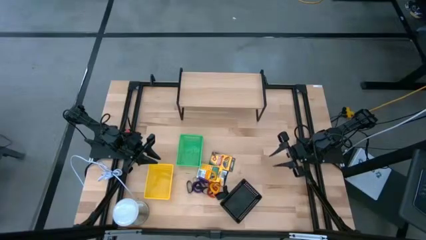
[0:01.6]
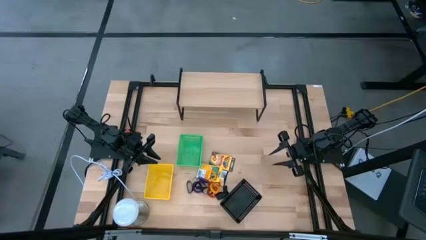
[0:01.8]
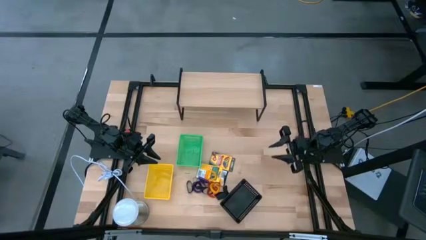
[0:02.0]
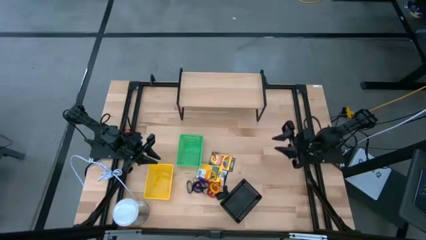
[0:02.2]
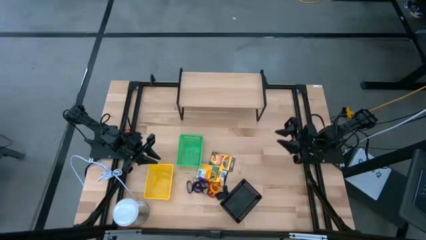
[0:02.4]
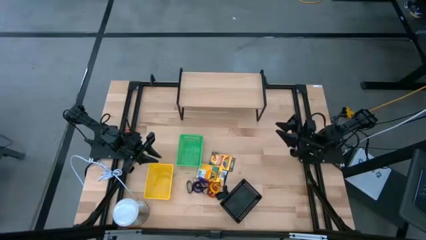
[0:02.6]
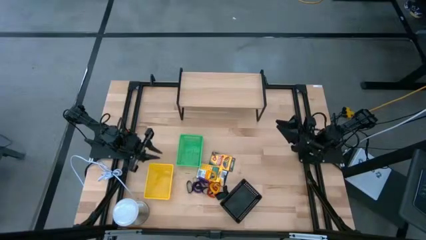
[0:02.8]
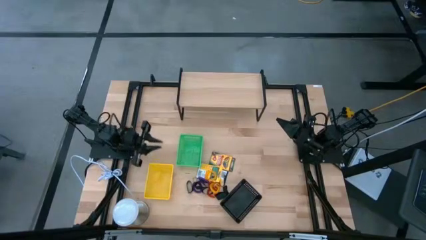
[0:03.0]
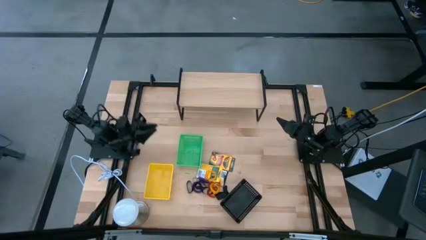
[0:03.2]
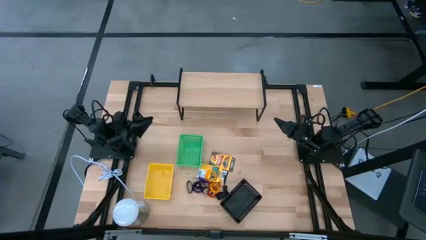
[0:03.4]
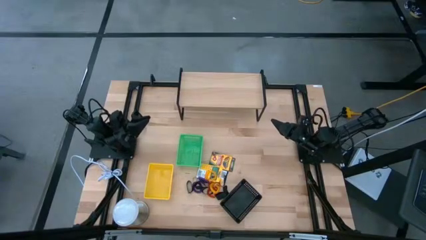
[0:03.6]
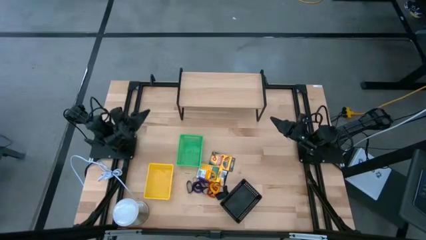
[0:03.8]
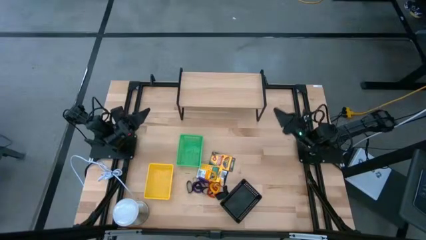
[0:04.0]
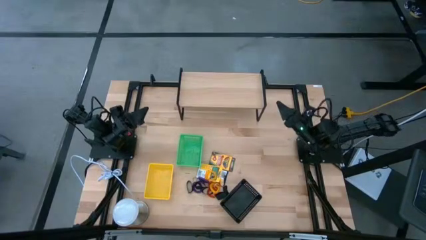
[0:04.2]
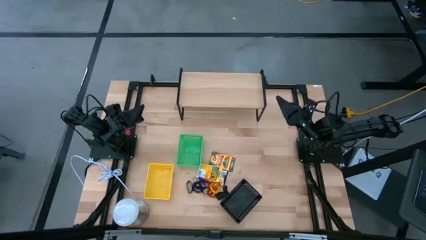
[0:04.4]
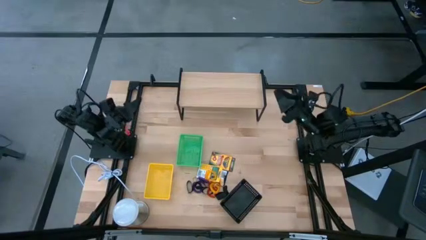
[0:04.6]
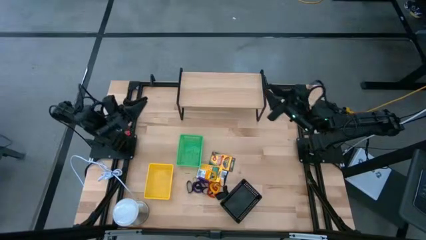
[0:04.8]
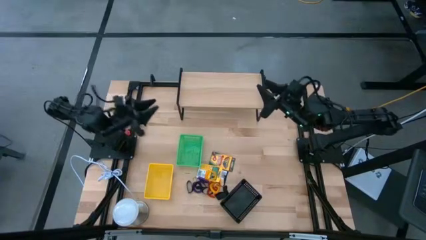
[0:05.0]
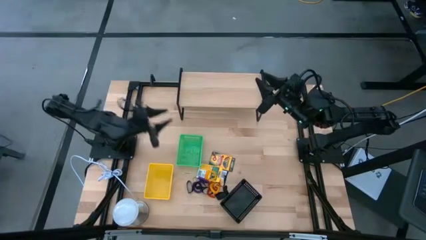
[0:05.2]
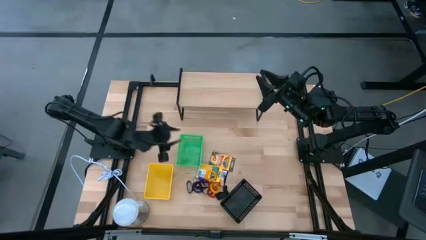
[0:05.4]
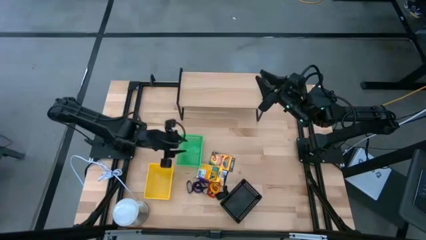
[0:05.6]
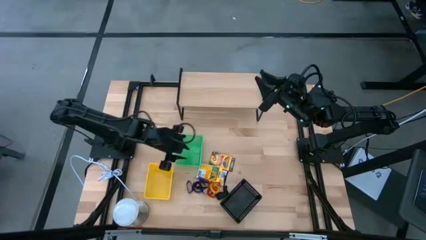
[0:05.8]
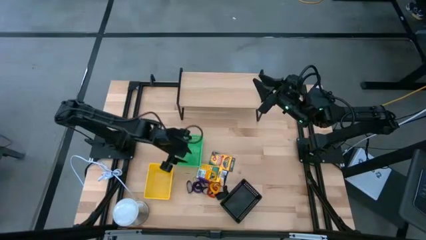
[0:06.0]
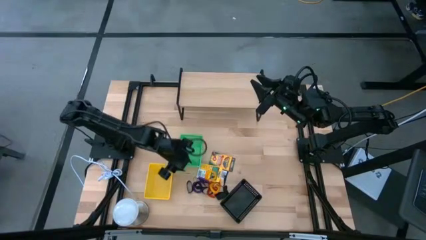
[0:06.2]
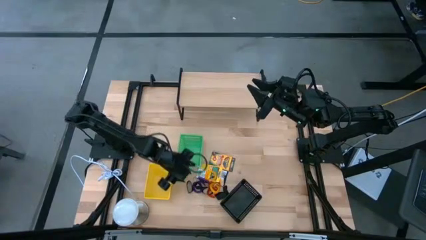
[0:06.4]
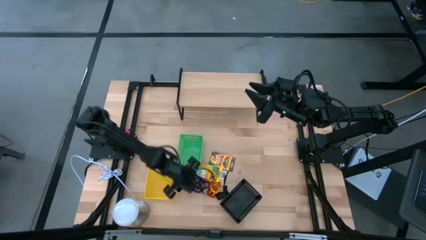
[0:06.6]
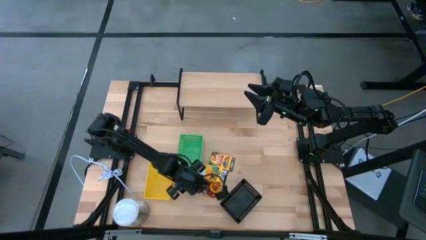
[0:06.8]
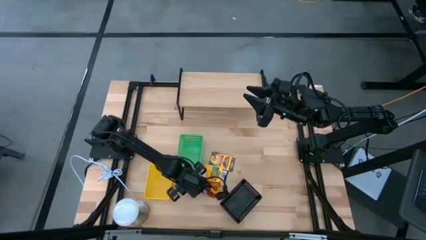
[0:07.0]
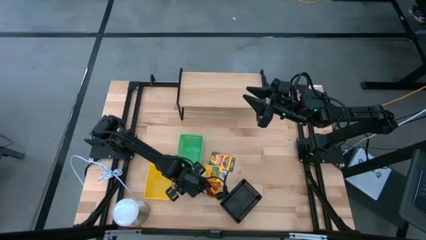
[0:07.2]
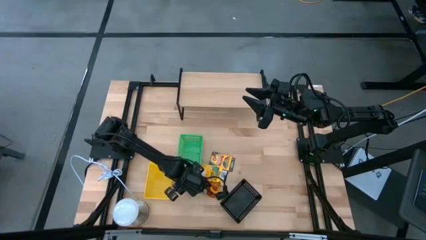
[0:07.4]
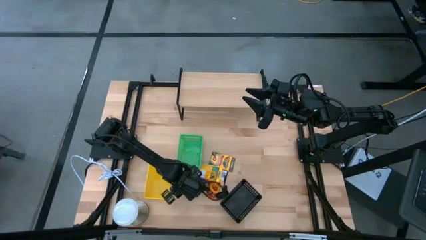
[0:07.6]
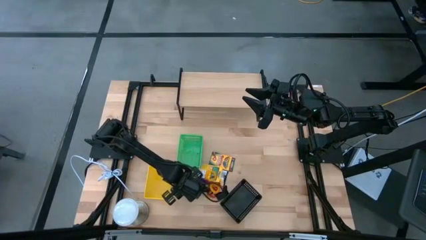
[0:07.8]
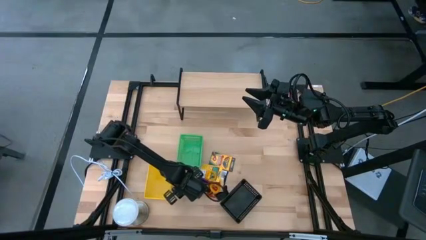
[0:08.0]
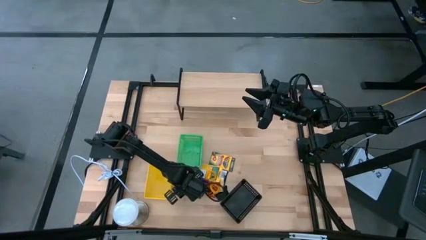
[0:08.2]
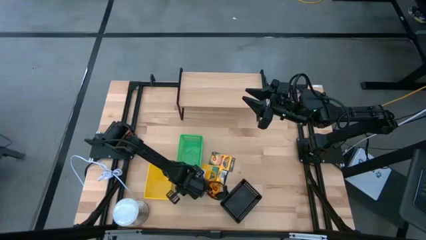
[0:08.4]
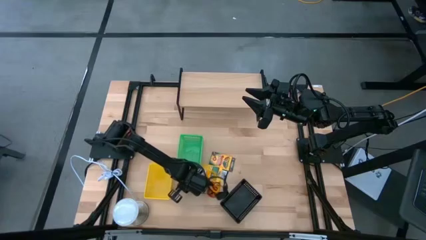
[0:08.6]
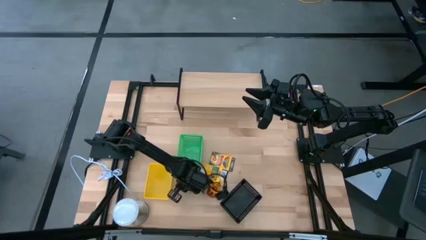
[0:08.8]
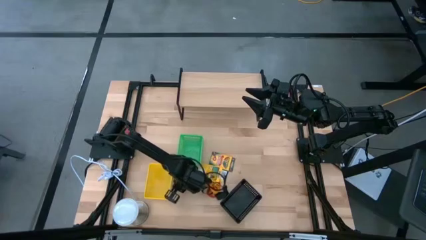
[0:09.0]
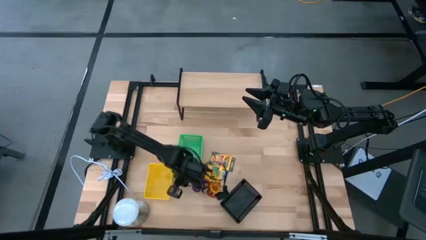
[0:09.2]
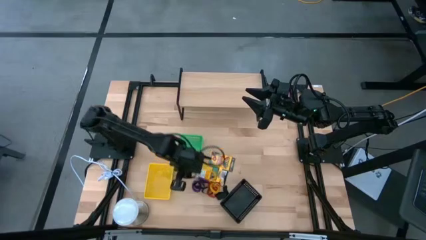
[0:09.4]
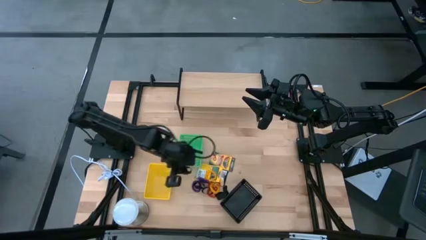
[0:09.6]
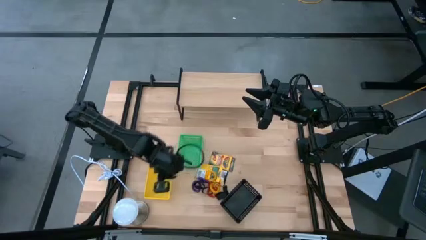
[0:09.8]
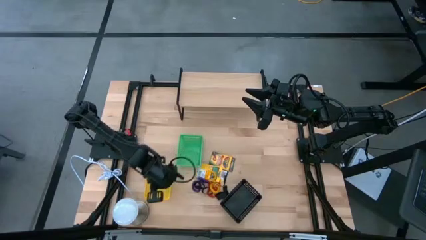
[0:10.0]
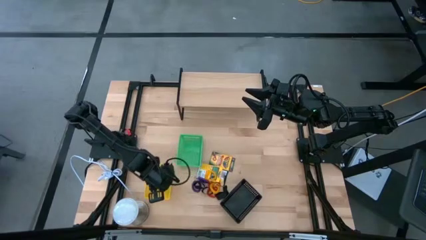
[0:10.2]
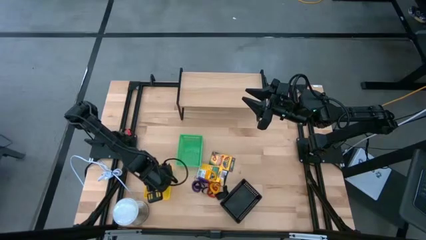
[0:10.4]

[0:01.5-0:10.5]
Task: Pick & Place Office Desk Supplies
Put the black rubber band into the yellow basket

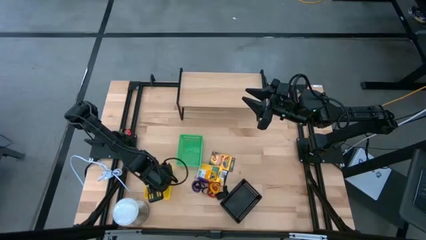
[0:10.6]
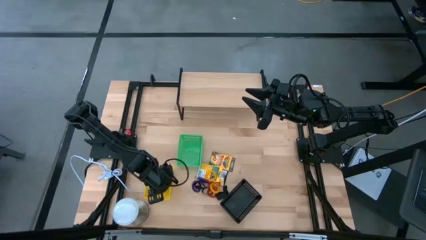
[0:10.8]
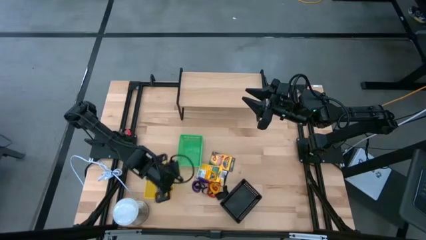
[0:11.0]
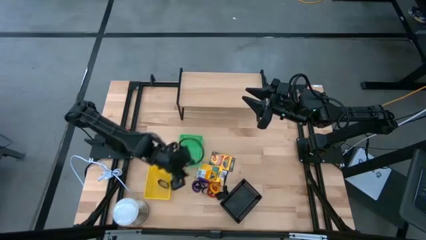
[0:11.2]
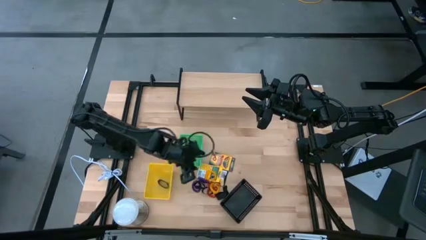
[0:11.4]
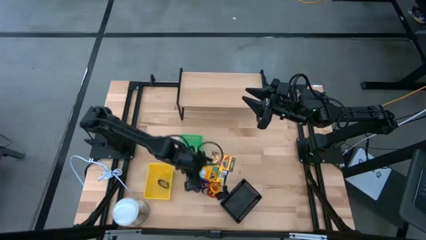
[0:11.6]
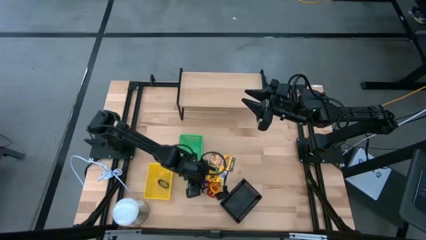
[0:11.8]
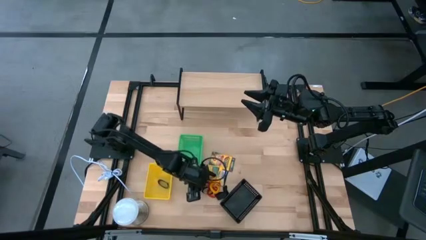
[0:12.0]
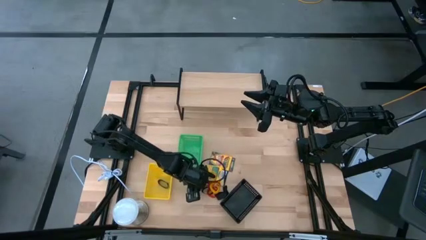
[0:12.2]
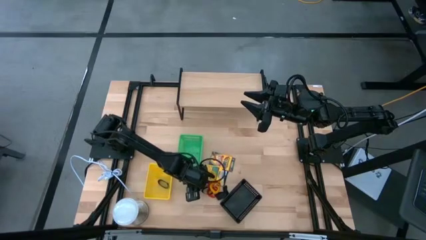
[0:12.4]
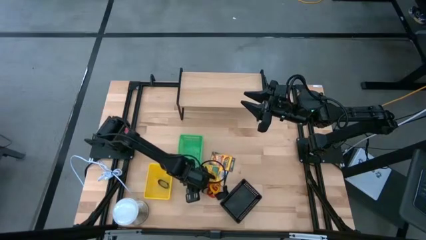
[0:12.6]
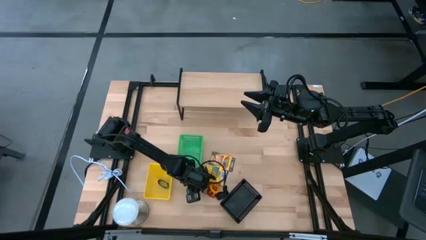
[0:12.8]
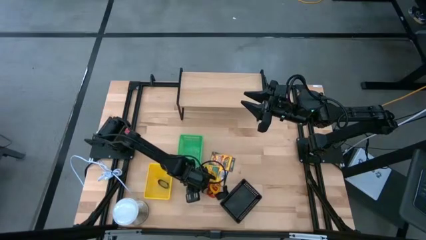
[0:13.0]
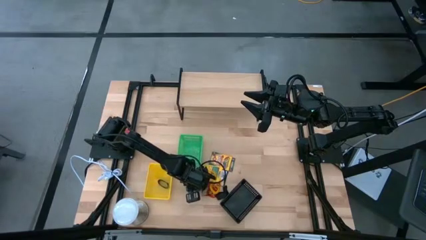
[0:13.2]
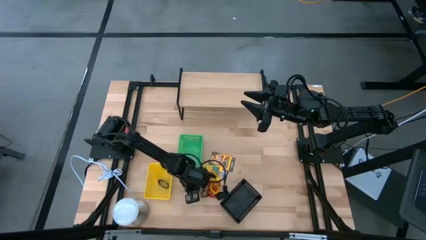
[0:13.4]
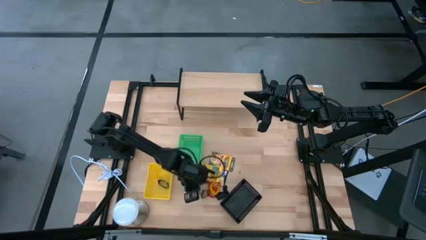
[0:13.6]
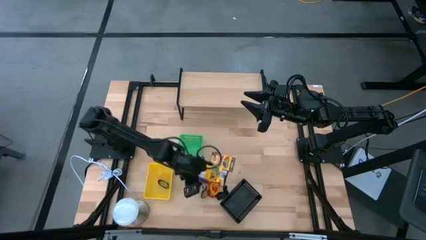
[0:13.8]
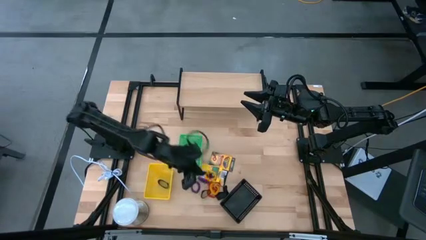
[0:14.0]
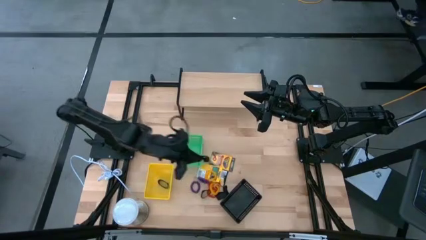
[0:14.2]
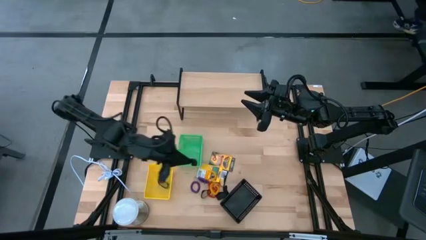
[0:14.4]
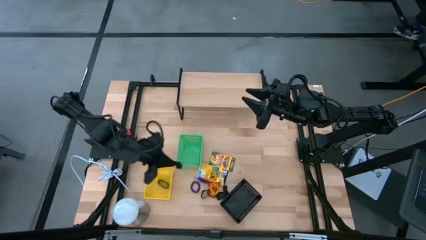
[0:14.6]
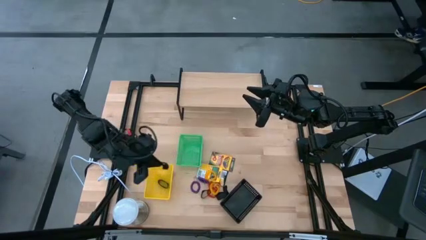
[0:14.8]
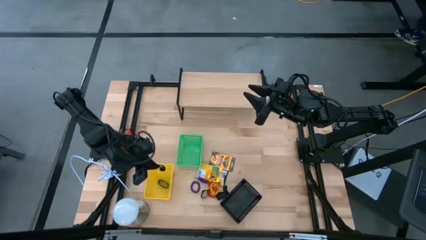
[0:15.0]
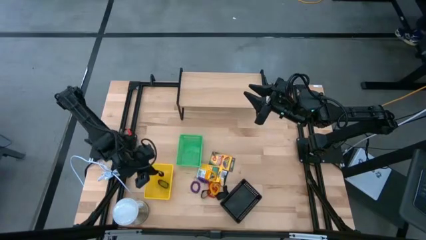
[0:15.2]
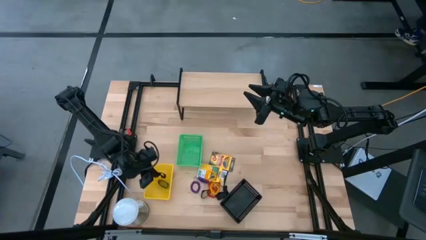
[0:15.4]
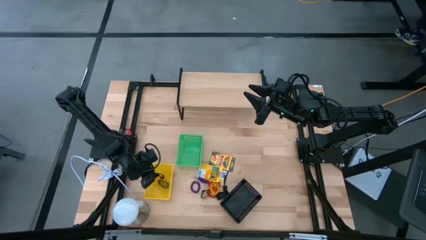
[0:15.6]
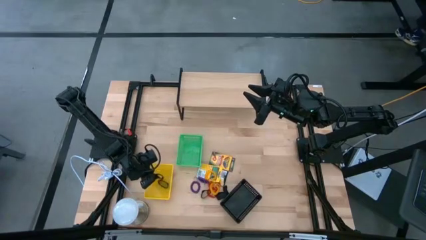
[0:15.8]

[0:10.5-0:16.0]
Put the black rubber band into the yellow basket

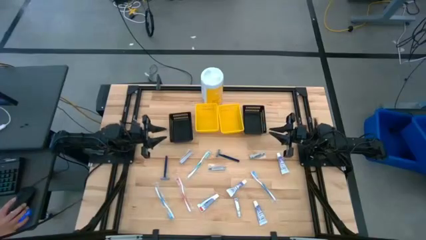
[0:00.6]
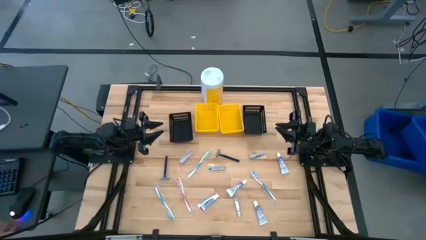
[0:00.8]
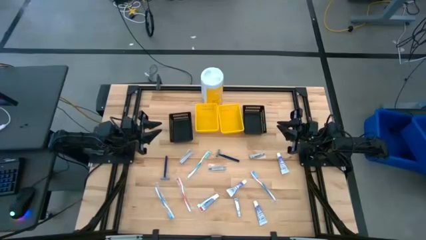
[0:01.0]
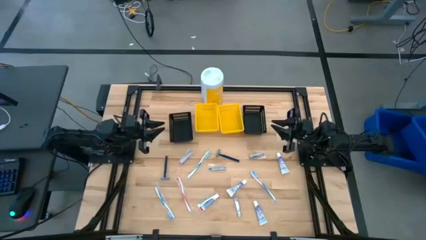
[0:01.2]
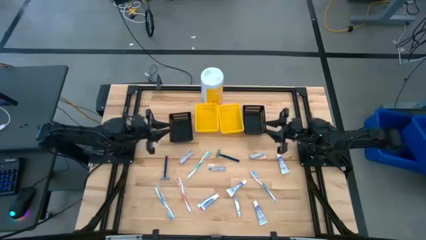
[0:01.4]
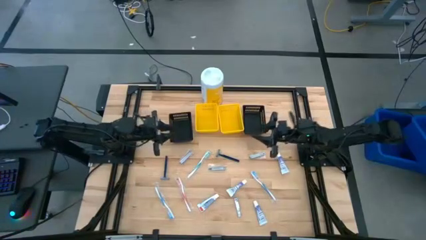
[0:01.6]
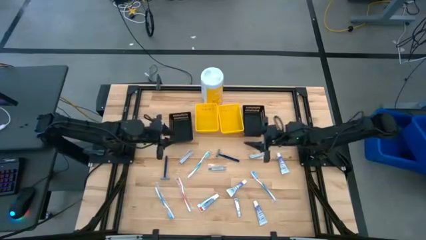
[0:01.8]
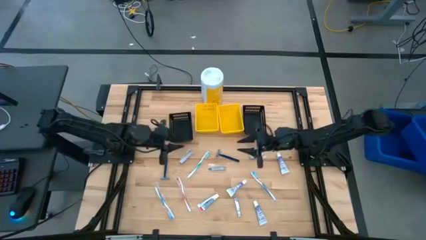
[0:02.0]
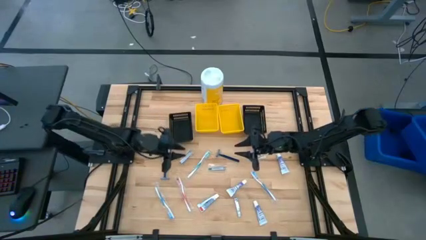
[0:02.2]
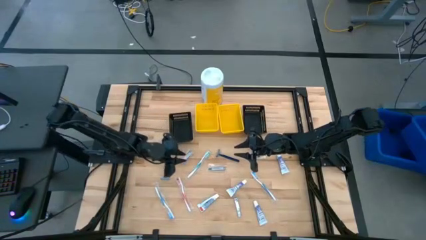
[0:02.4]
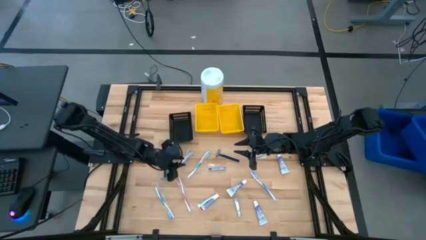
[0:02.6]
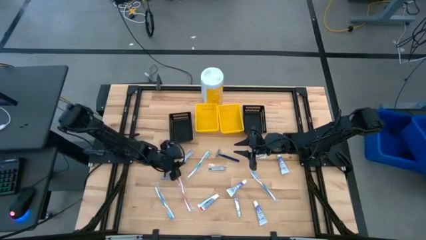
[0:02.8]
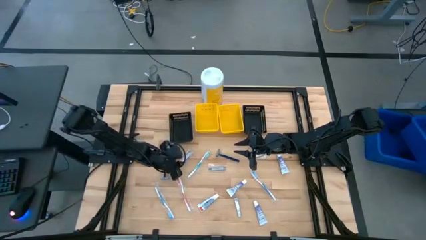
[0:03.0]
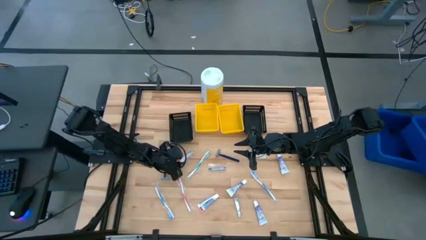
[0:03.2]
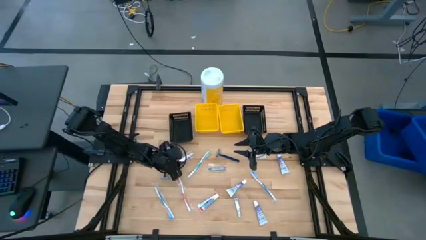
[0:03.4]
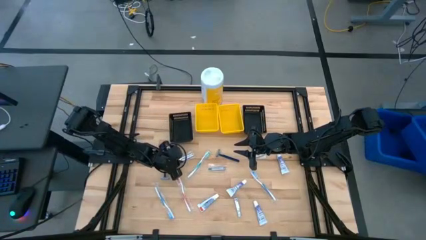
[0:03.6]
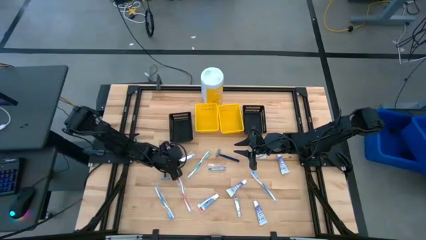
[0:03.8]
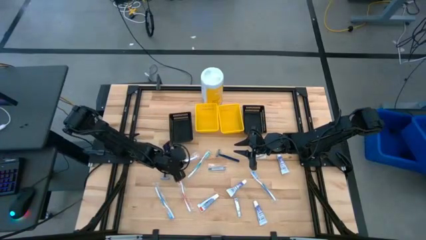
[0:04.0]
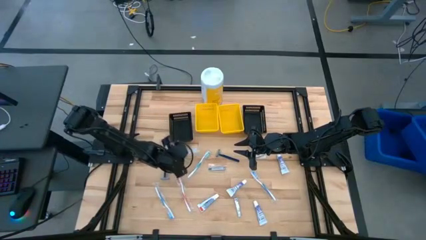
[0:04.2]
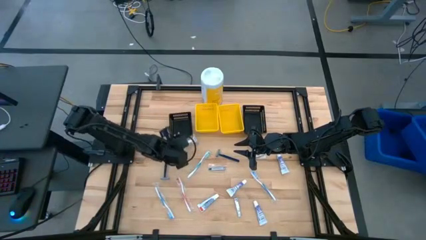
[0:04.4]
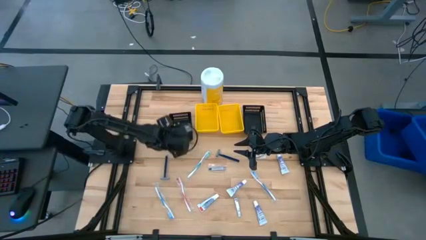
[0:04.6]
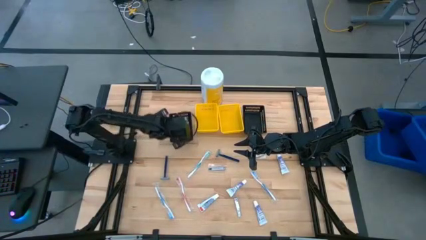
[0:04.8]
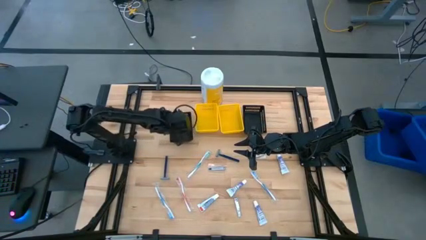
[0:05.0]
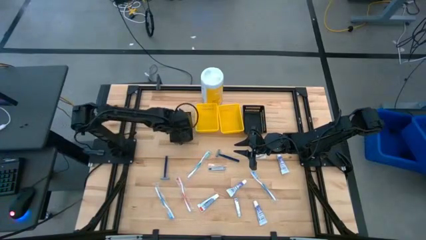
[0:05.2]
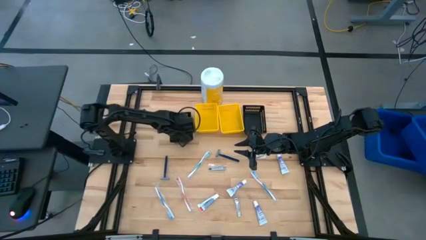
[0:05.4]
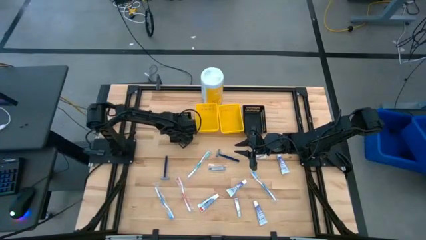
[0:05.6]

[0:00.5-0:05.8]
Task: Pick & Place Travel size toiletries
Put the silver nail cutter into the left black bin
